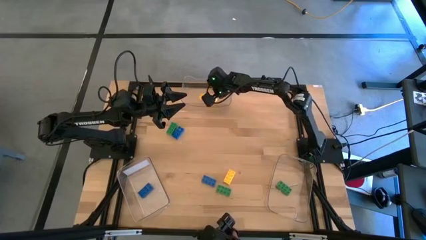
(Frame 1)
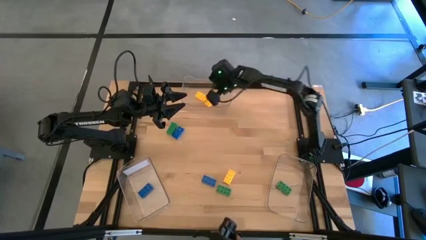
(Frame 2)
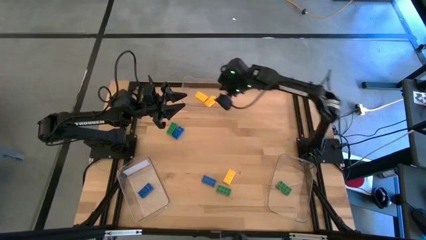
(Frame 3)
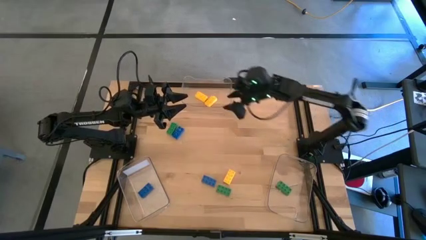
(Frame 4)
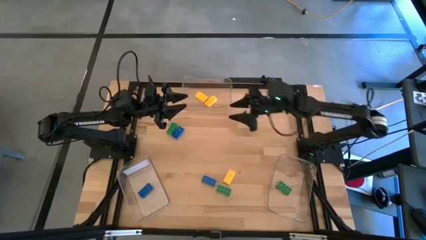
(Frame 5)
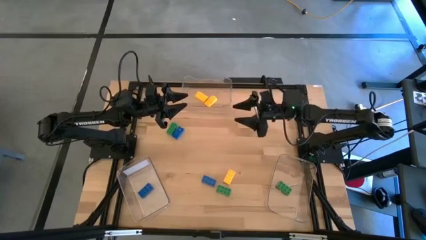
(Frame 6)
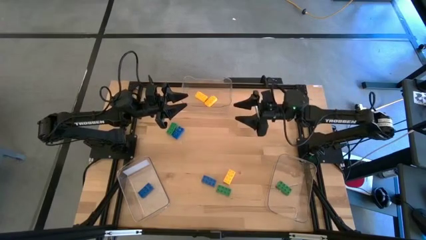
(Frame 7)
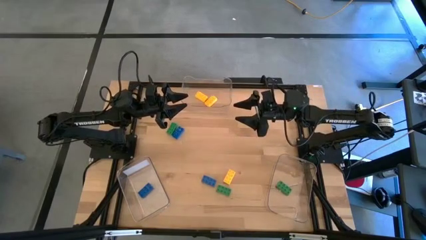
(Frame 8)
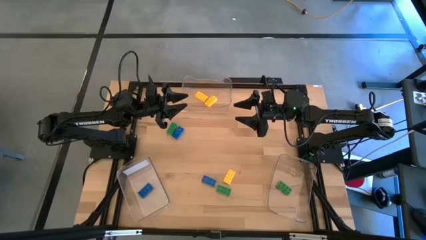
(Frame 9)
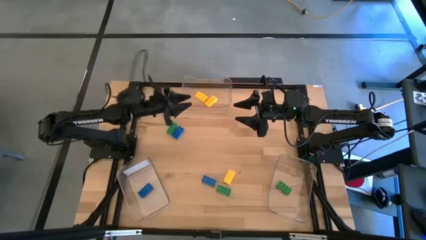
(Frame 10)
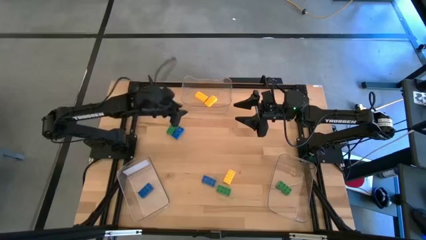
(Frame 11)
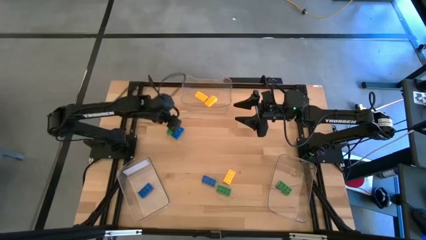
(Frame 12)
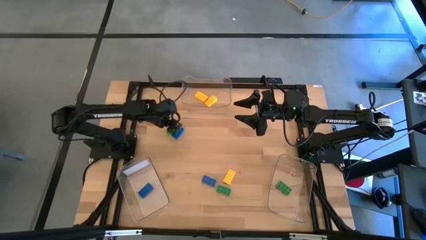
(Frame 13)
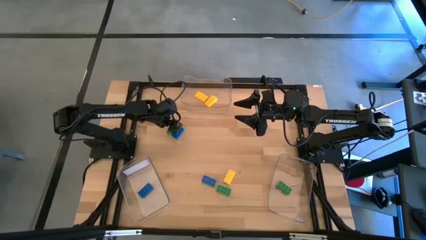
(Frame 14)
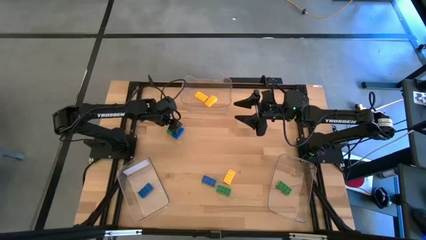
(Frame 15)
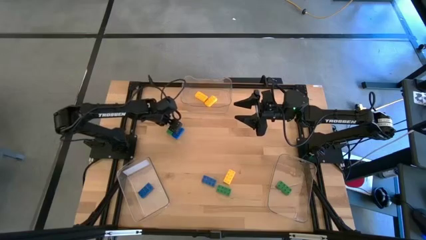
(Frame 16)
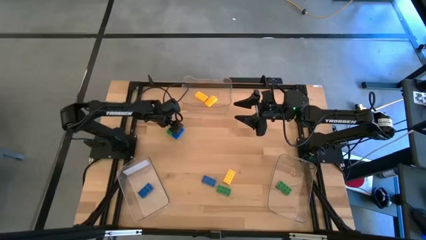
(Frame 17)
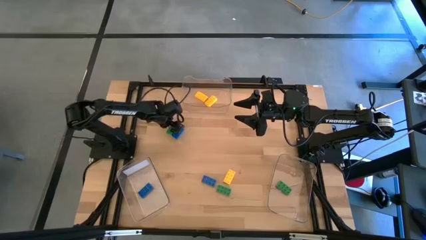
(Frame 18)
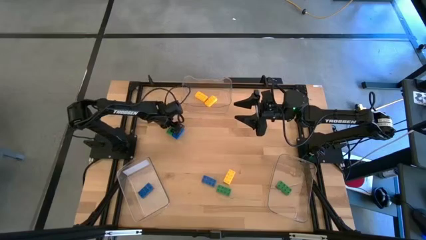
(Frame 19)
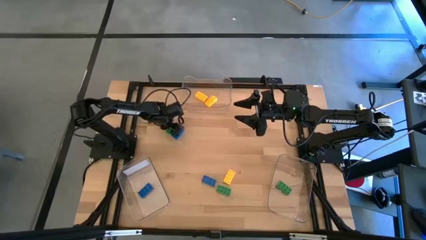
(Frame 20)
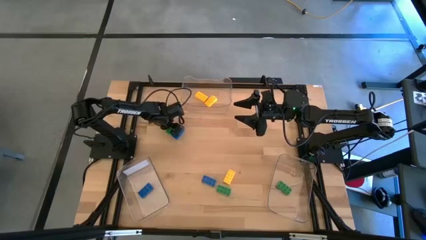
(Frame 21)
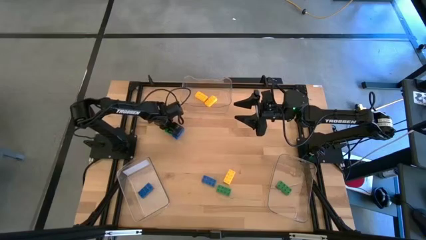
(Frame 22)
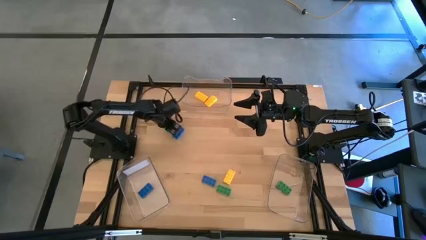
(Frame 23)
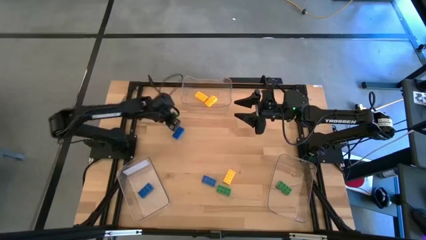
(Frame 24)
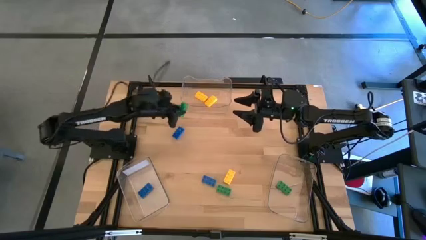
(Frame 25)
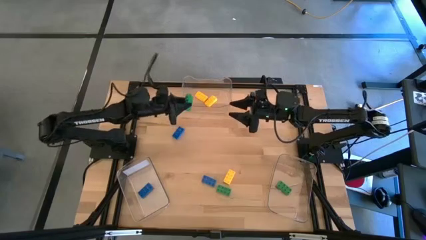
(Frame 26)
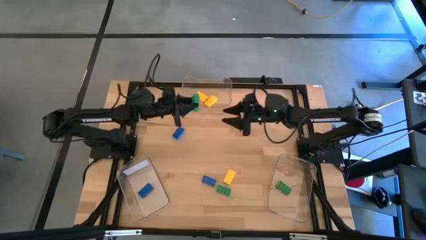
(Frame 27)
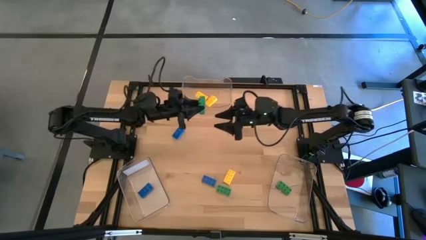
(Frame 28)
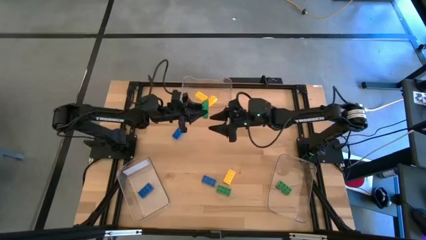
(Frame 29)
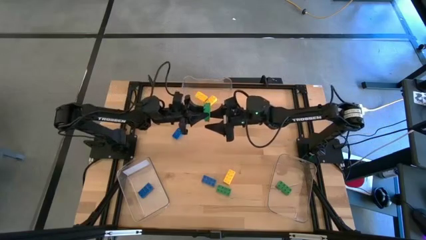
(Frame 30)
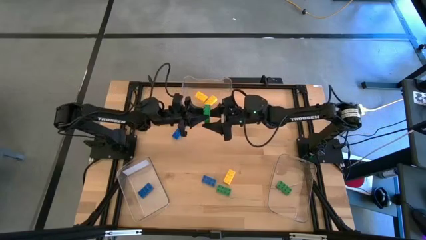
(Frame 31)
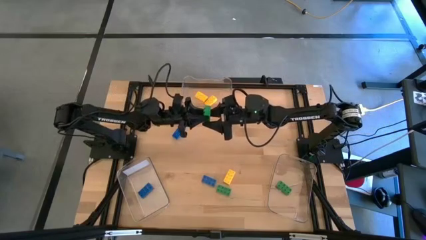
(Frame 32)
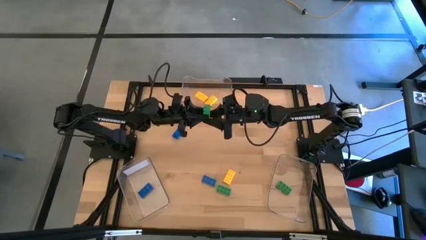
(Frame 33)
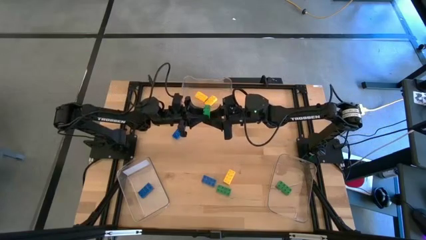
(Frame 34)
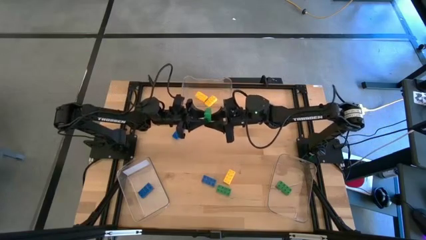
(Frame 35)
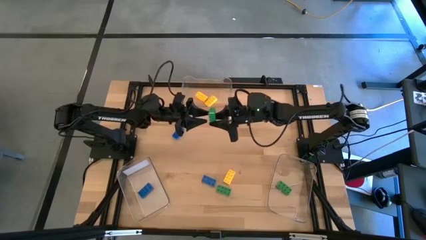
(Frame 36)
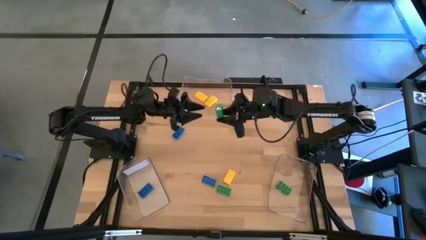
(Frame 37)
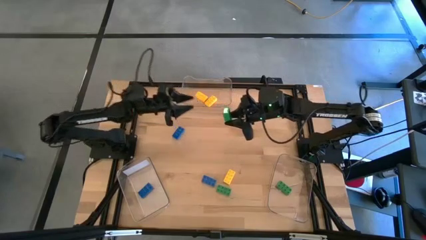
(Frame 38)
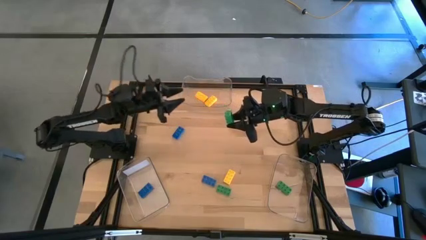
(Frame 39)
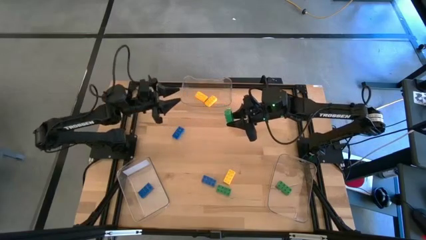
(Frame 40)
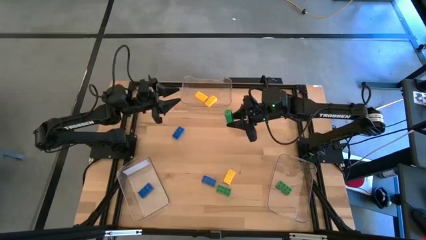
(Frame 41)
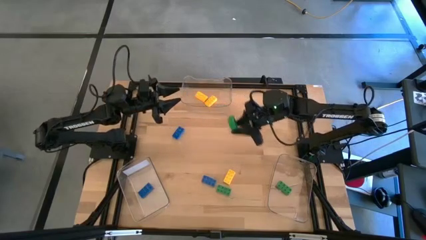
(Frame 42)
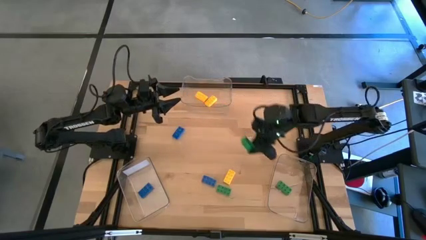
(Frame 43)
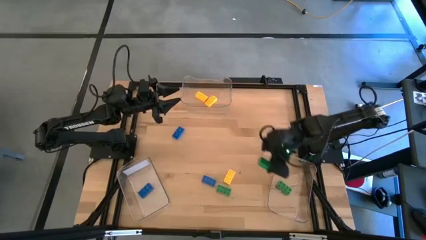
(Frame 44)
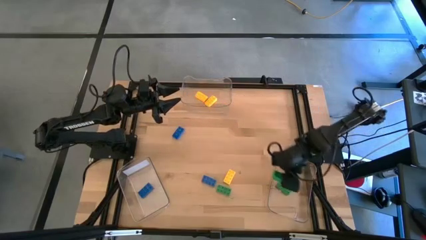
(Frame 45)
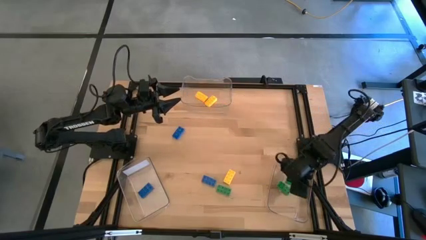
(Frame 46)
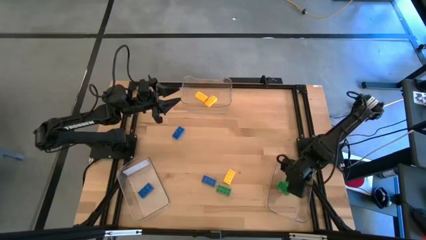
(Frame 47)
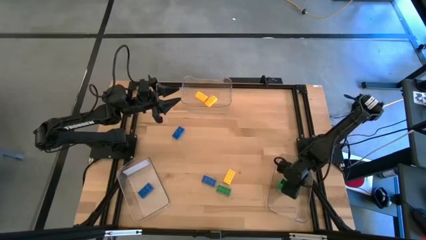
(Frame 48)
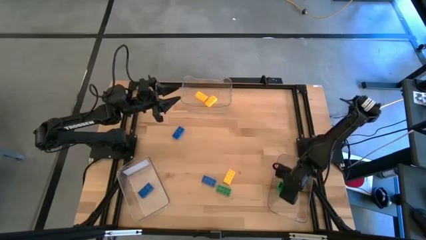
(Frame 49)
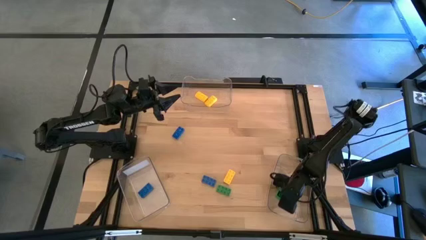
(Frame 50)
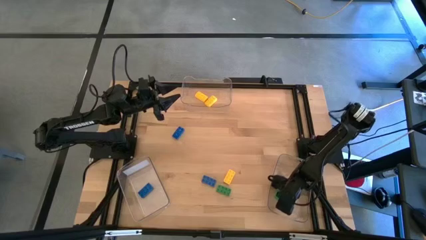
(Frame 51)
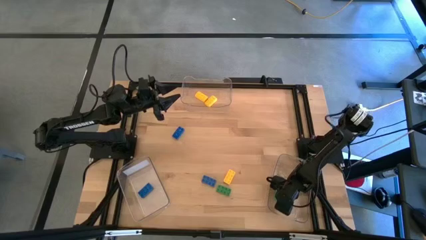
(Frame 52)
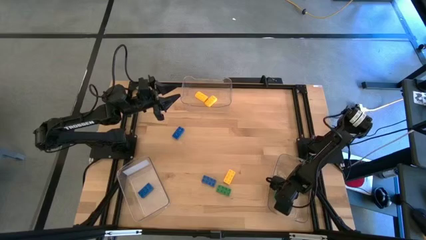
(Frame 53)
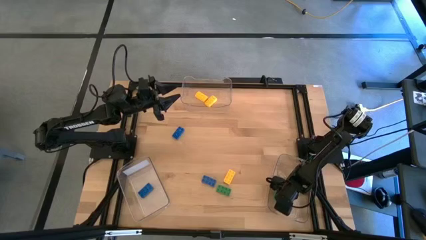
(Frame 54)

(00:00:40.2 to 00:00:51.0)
Task: Sort & place blocks by color
Put the top green game piece into the bottom right transparent bin

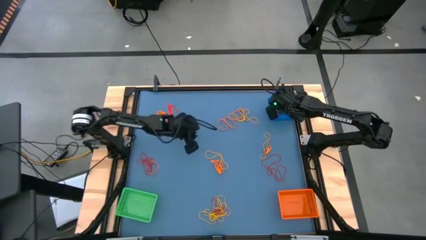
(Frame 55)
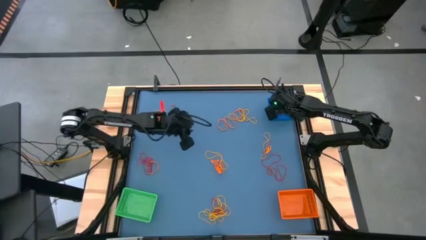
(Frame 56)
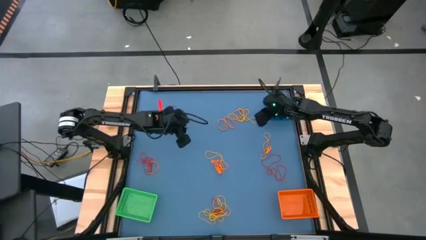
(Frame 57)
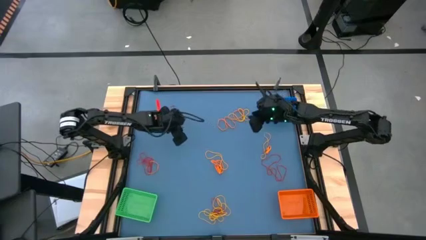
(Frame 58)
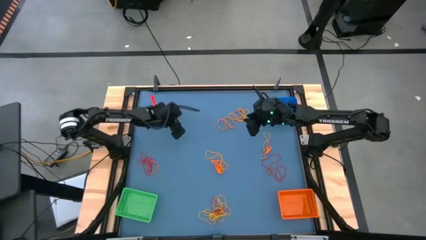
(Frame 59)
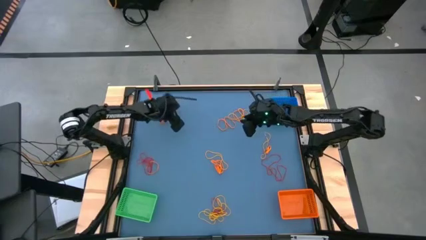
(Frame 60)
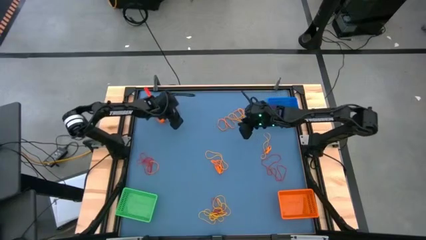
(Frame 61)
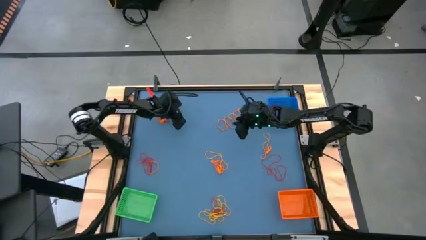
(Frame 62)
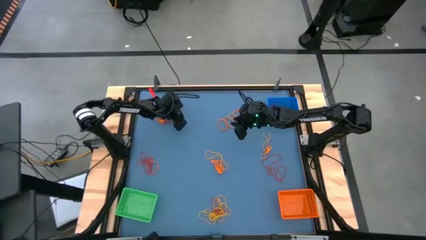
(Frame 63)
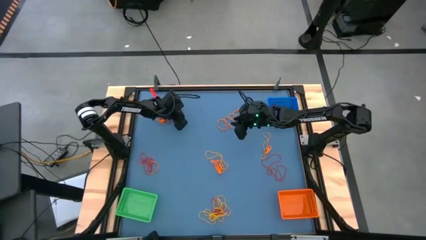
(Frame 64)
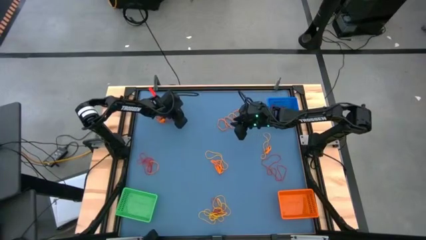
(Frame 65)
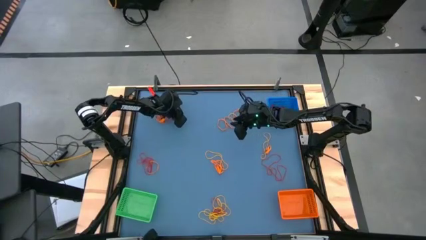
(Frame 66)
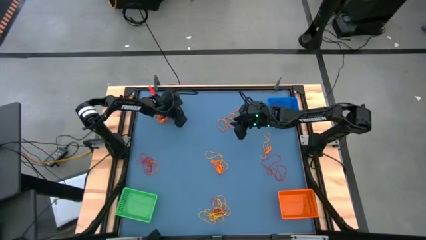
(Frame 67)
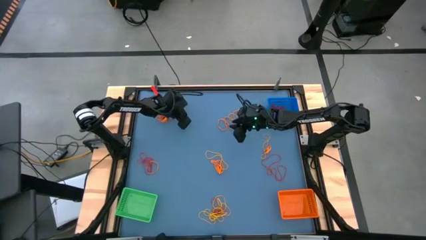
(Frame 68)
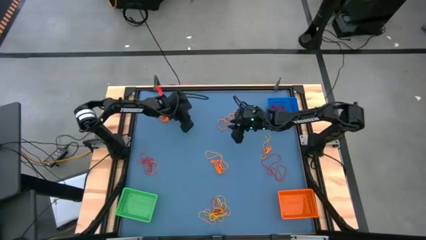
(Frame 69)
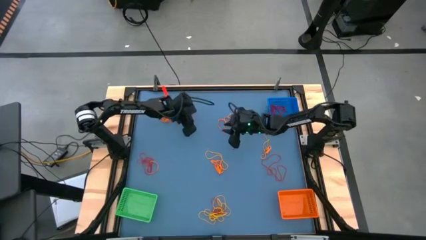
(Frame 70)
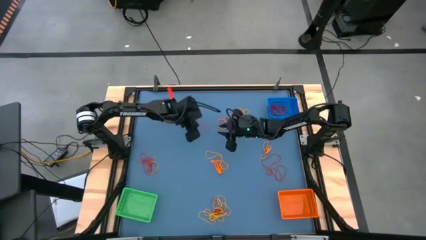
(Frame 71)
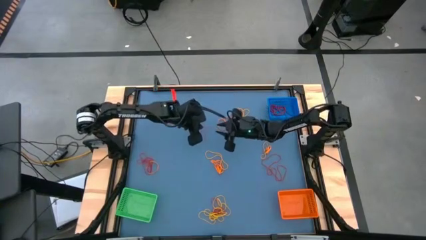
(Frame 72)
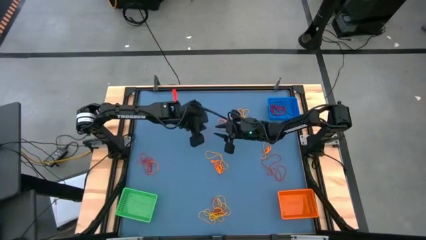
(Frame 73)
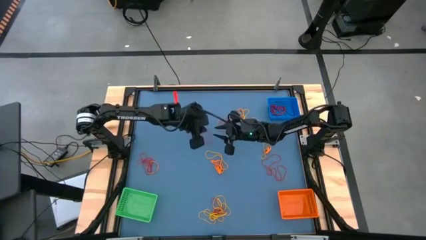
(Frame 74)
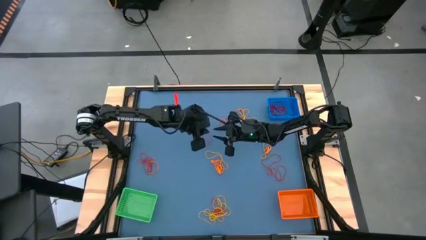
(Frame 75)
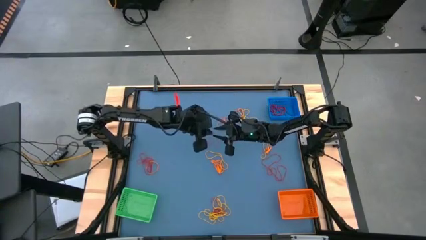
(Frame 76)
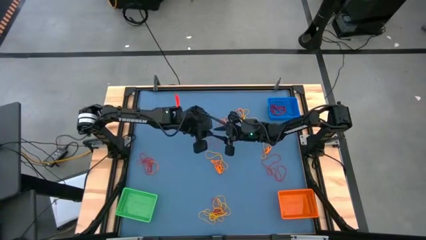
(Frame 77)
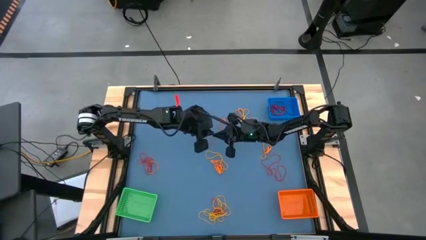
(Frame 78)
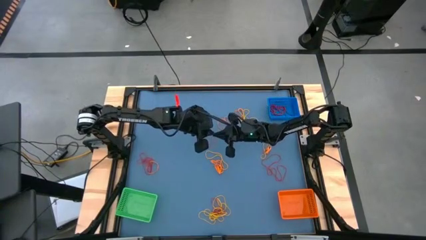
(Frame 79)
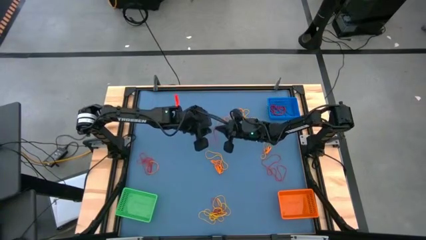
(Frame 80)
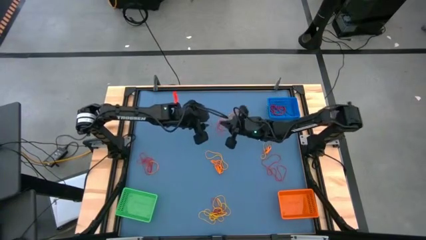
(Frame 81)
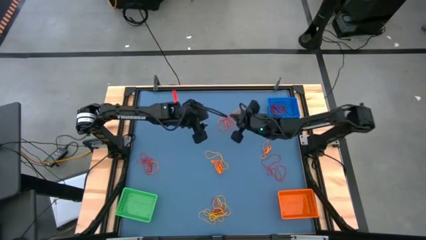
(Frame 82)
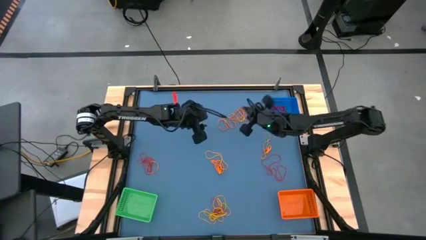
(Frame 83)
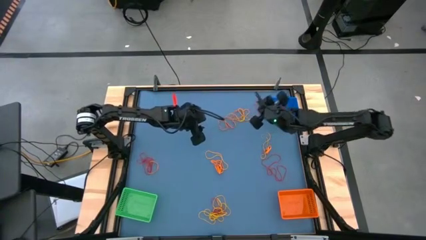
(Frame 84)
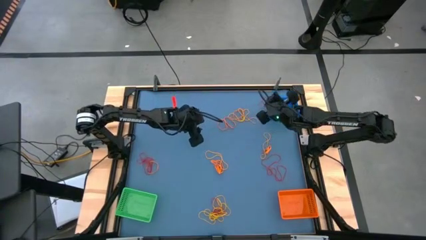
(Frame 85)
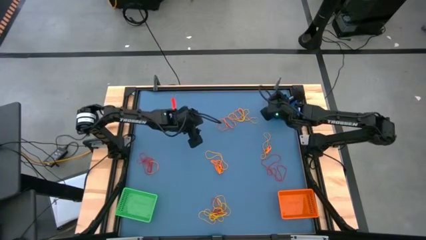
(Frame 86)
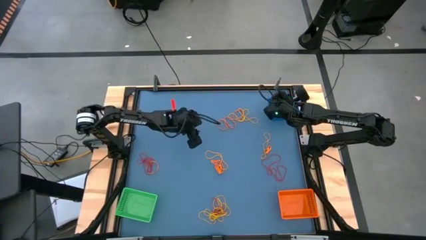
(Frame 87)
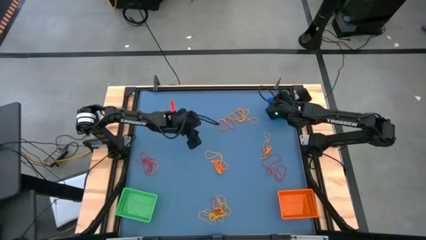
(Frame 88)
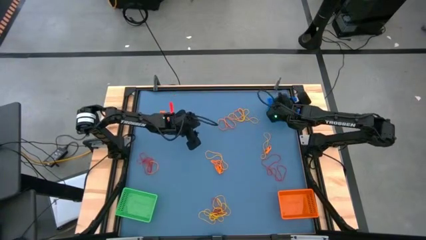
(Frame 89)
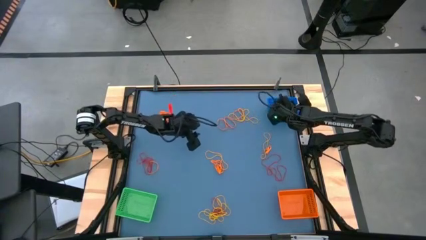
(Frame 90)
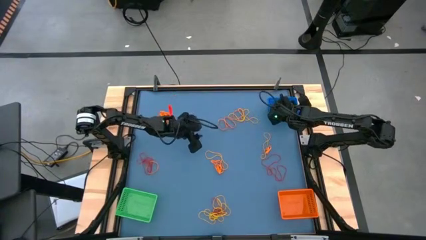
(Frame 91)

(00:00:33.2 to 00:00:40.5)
Task: Sort rubber bands into baskets
Put the red rubber band into the blue bin
